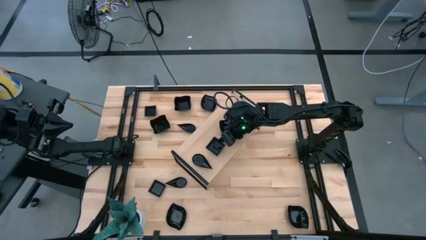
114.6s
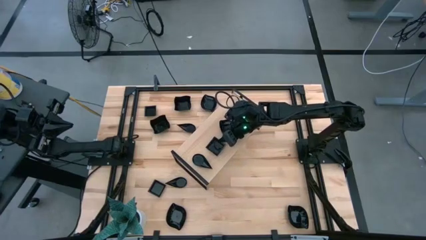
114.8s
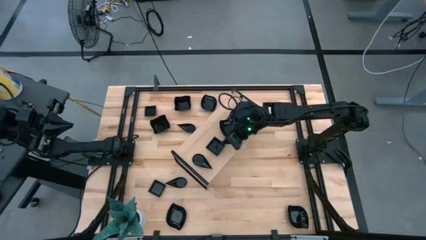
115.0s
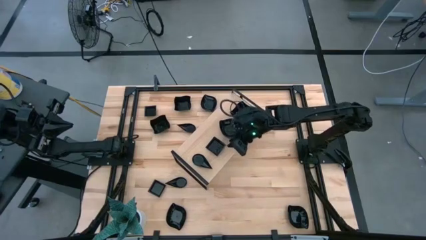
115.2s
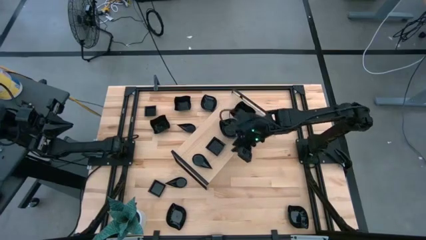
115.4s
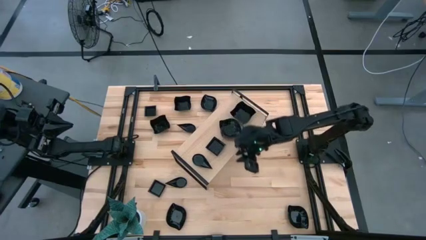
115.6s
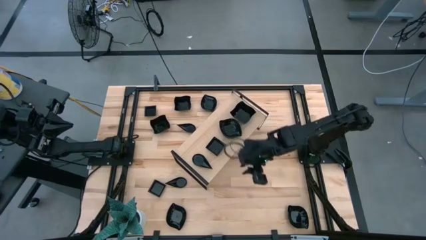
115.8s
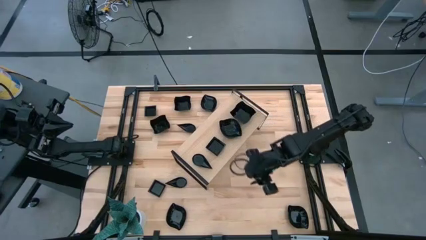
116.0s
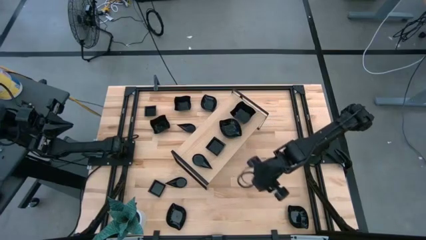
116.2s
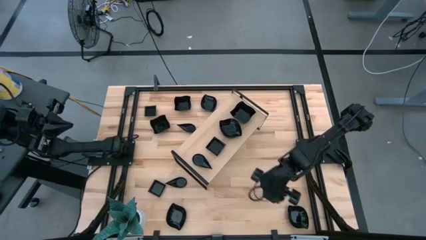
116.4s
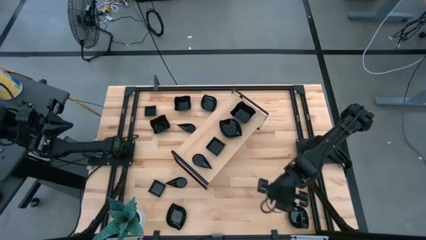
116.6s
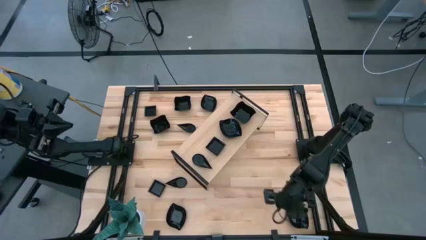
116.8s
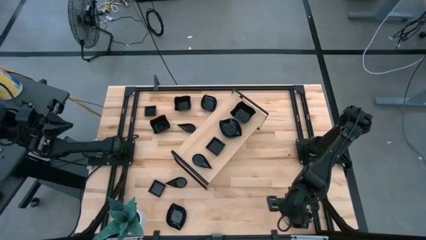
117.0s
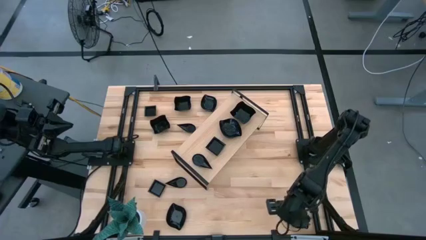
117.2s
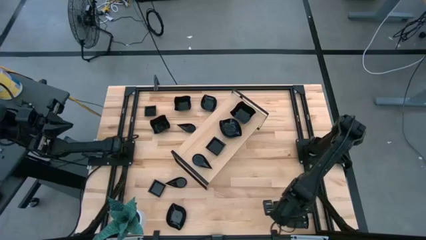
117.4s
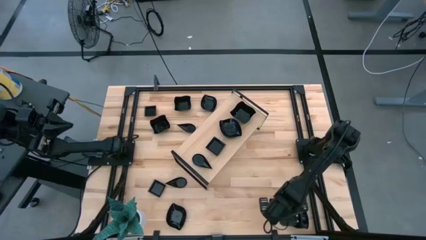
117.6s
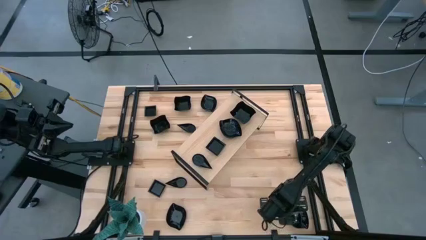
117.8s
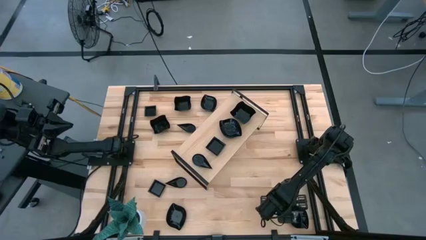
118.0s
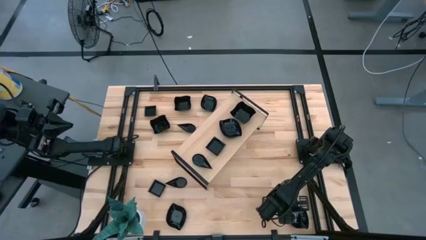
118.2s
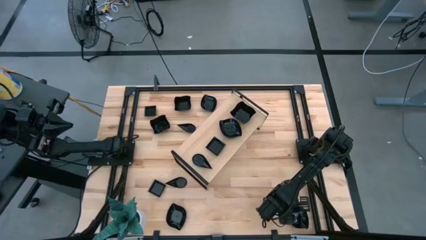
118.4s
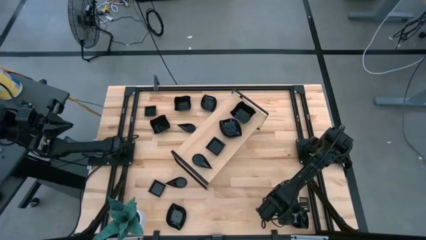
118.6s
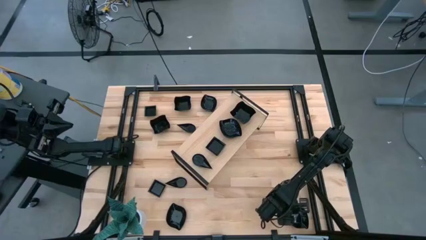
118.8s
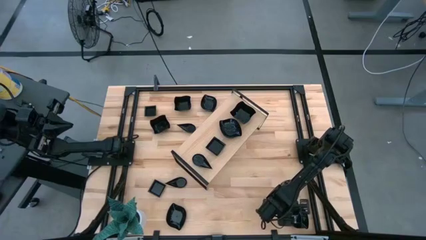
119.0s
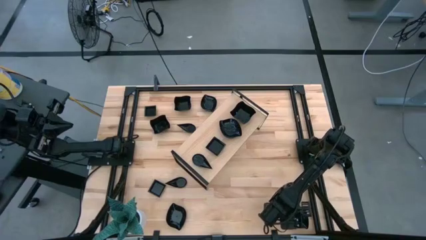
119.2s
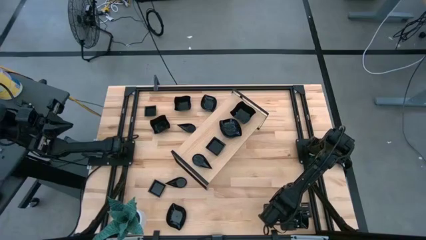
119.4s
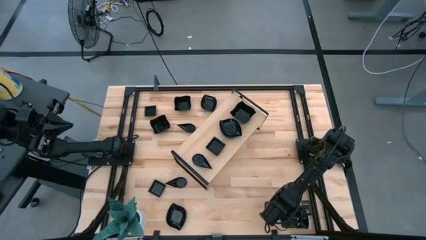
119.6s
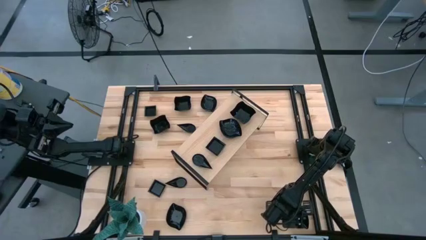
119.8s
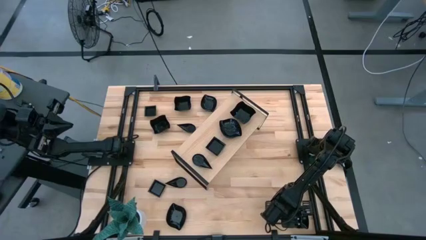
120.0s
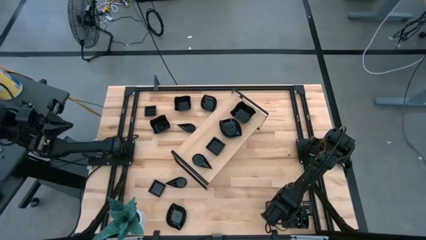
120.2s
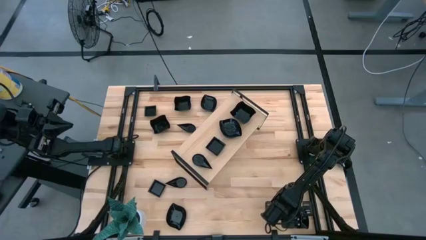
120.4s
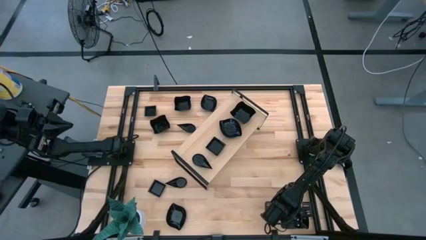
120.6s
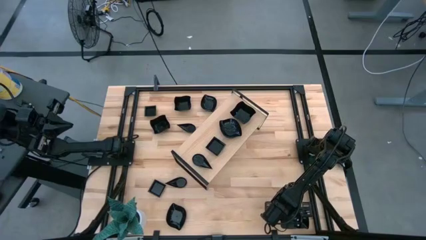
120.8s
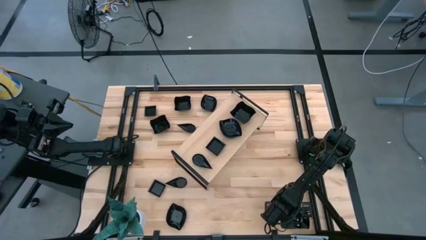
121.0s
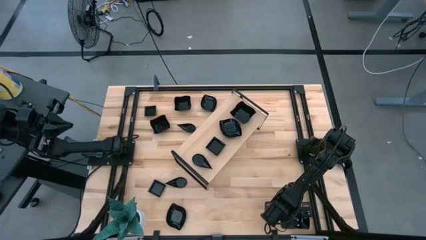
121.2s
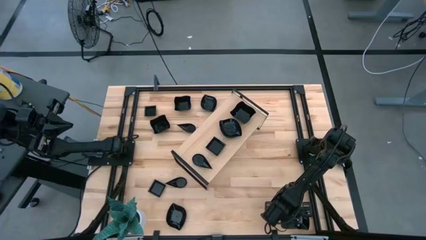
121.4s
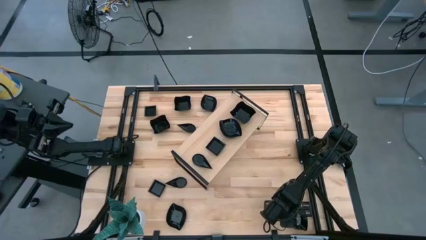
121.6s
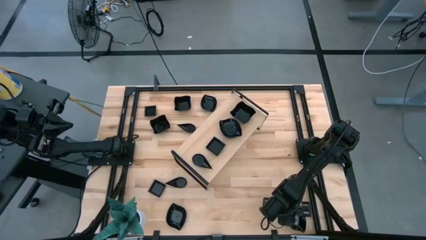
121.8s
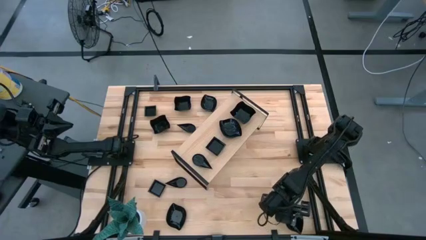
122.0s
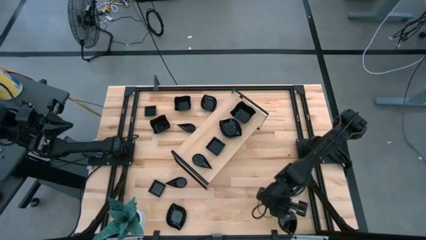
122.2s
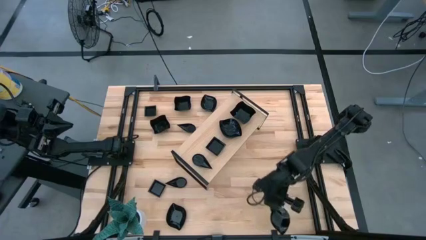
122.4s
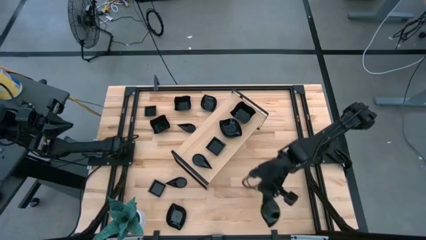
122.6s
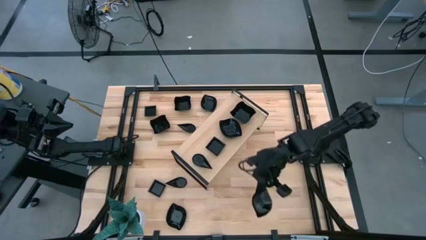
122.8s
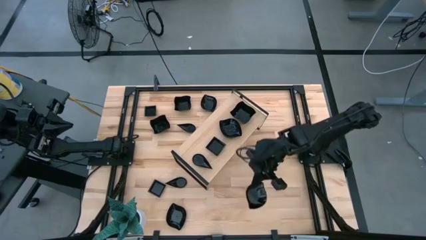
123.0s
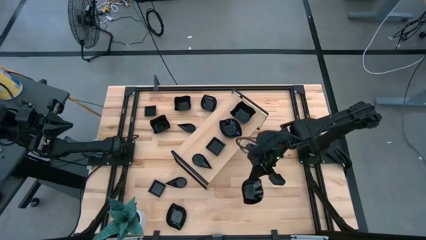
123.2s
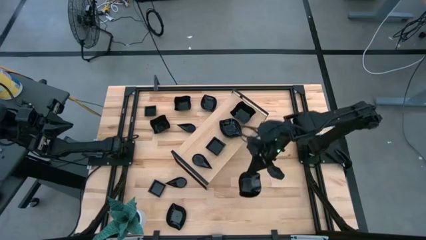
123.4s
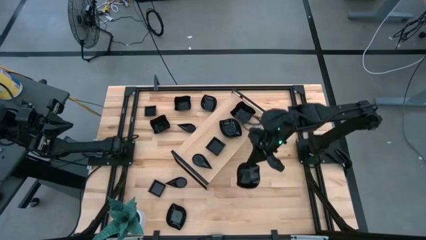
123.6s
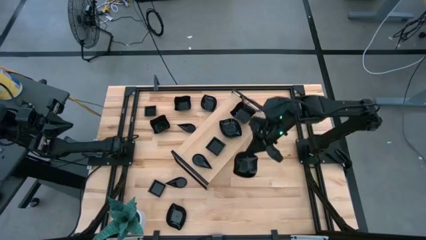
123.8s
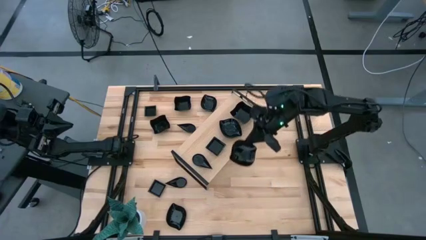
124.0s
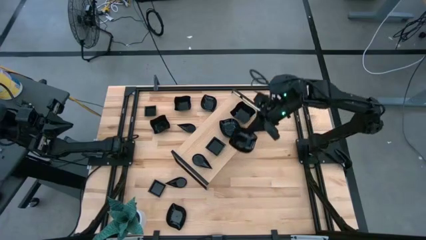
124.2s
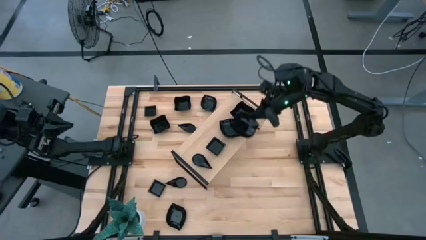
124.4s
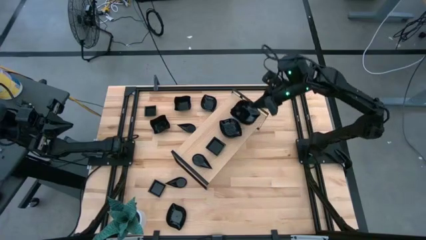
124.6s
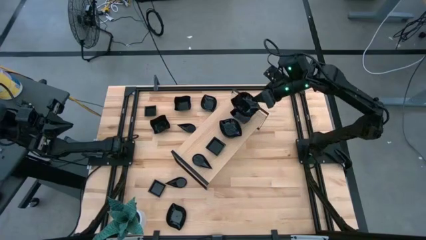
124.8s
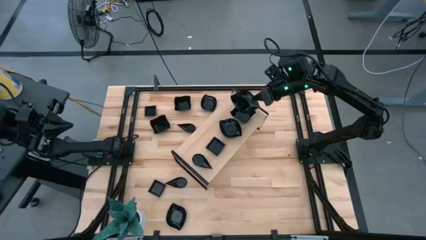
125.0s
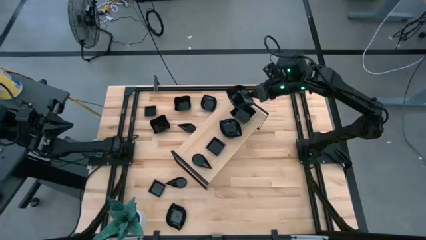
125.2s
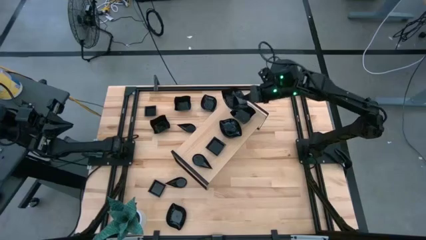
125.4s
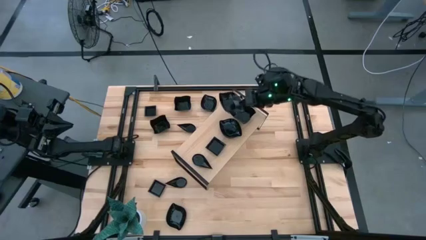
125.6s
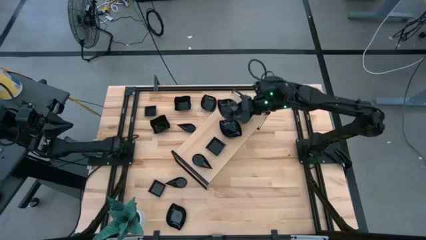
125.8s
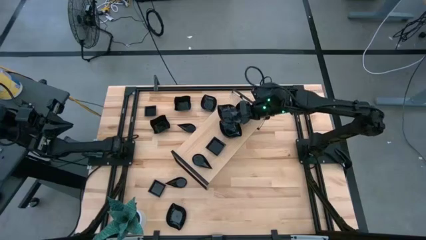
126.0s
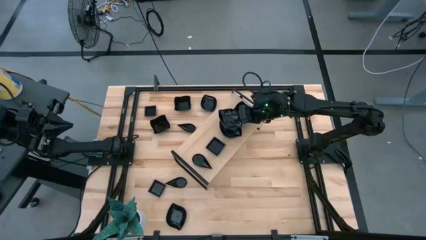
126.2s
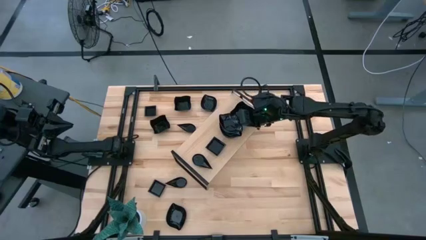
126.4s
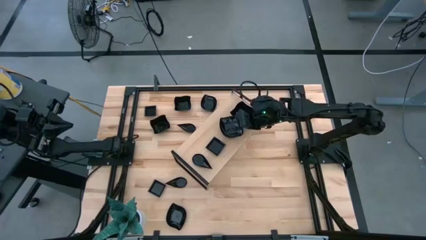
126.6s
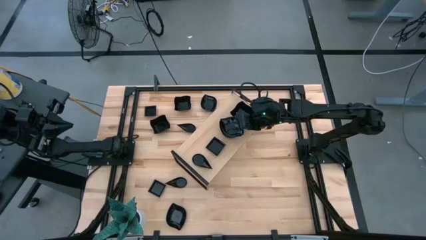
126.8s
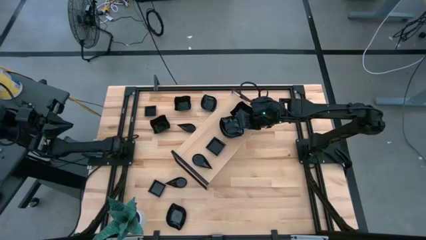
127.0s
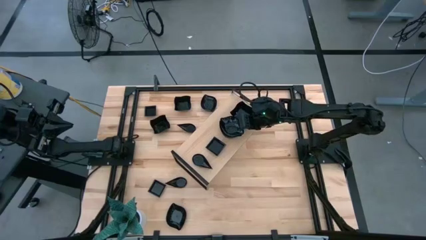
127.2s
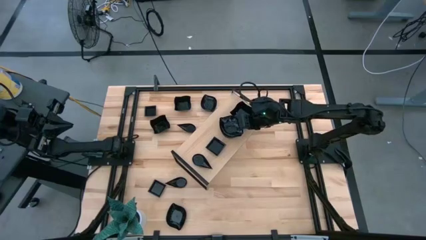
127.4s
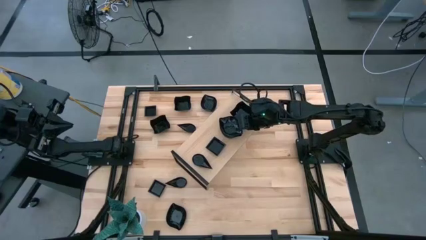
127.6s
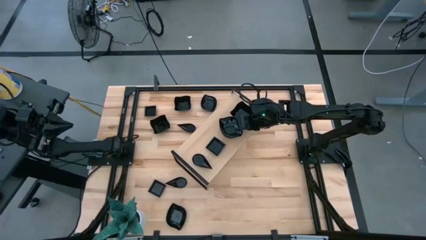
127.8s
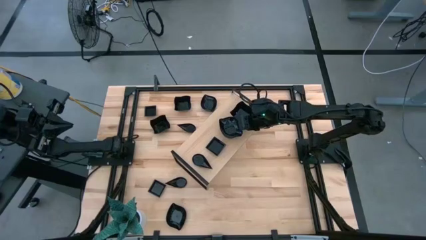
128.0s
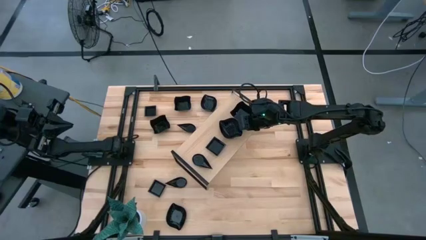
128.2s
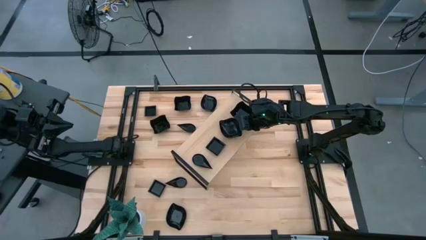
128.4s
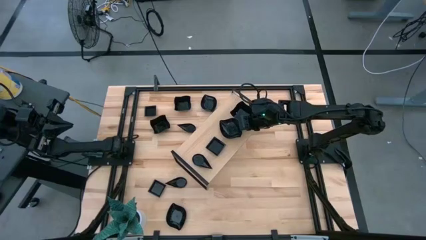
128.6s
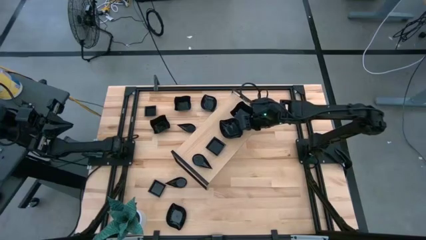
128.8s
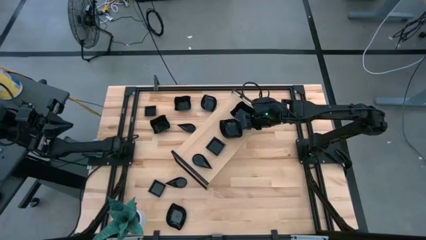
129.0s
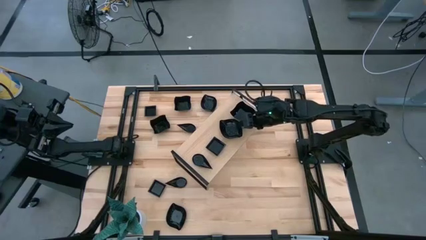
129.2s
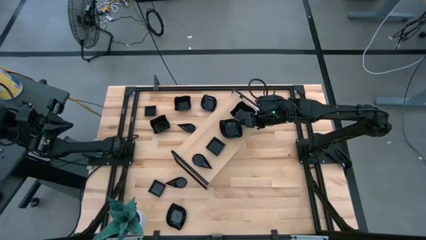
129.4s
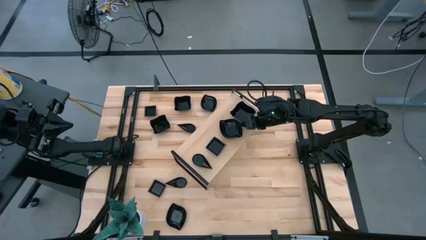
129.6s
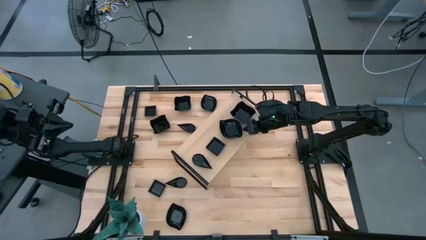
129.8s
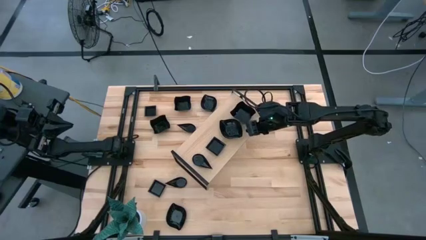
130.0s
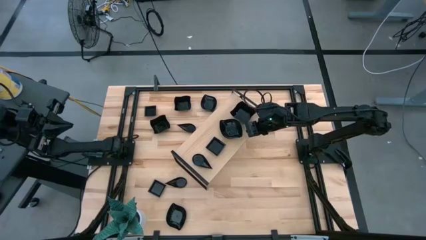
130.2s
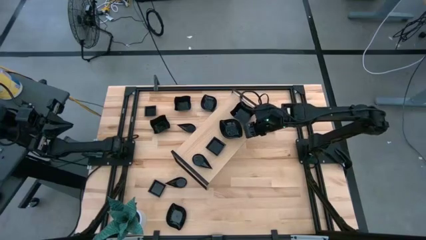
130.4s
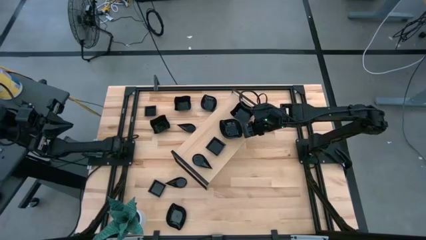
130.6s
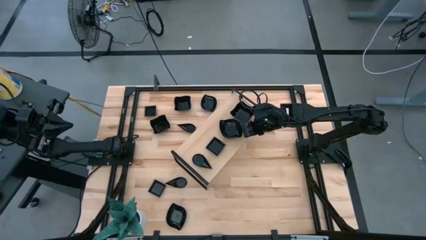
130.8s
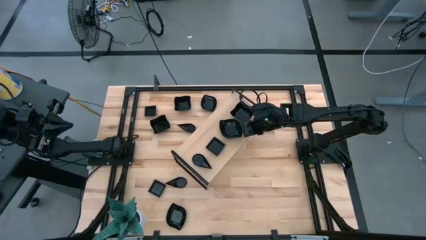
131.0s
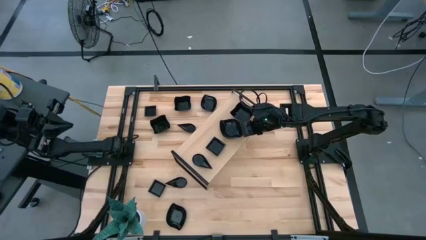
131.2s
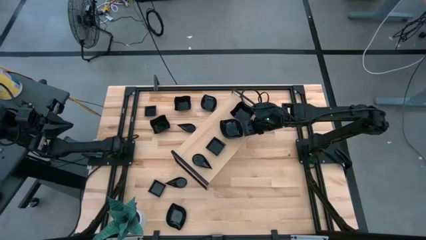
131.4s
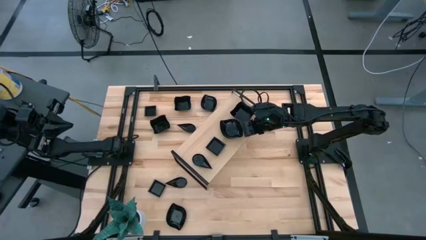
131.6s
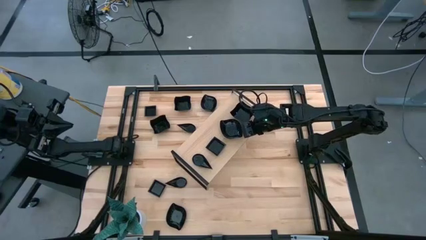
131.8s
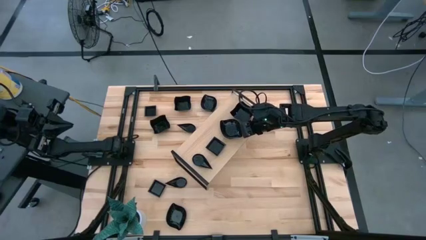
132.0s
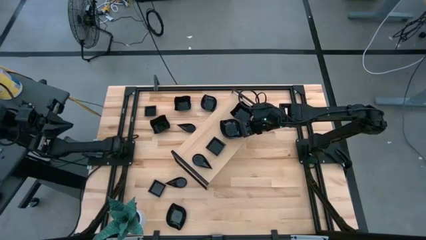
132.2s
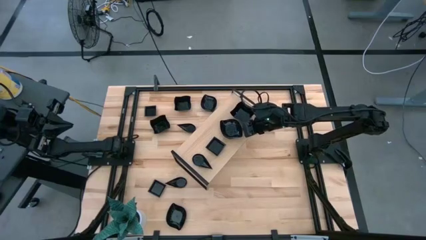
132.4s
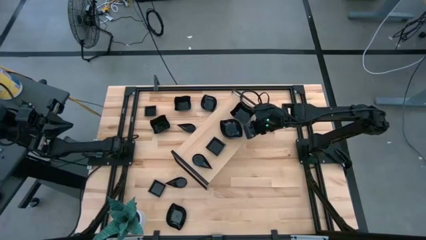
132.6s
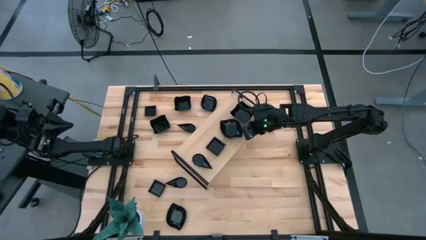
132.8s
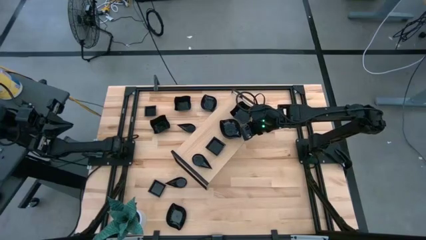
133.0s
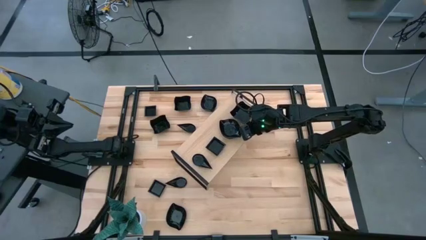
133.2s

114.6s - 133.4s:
Task: Pick & Place Mini shaped plates
Stack the black leaf shaped bowl on top of the black leaf shaped bowl on the shelf
